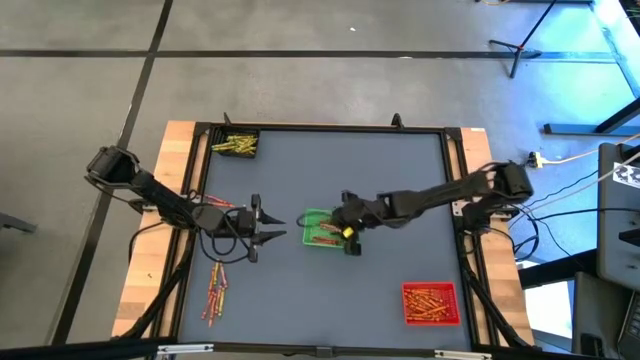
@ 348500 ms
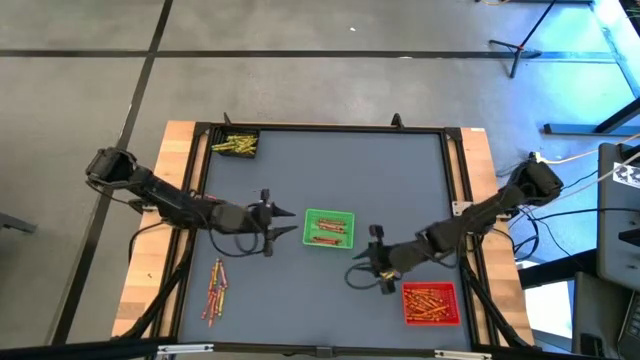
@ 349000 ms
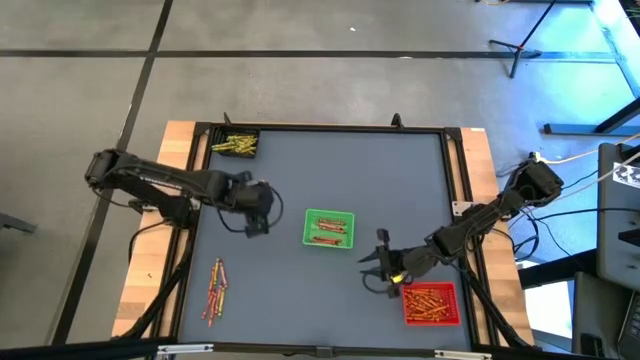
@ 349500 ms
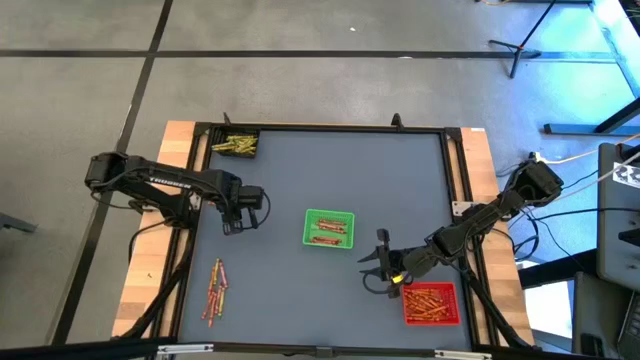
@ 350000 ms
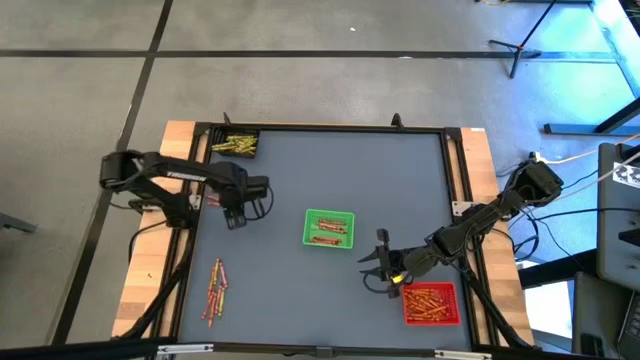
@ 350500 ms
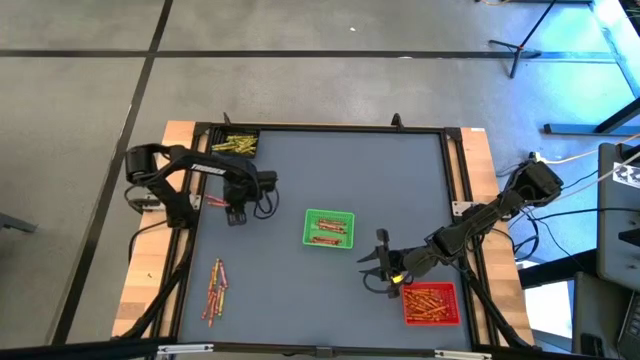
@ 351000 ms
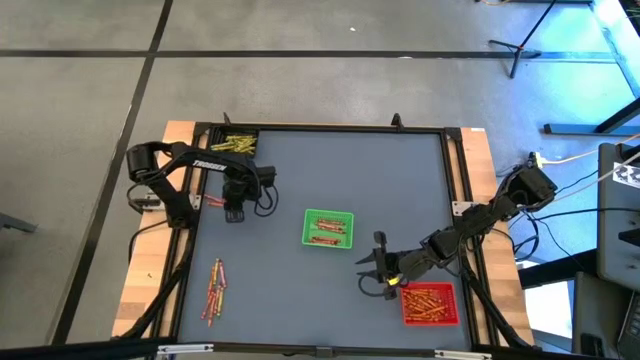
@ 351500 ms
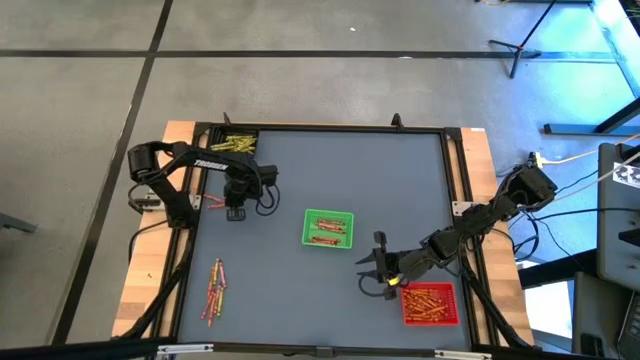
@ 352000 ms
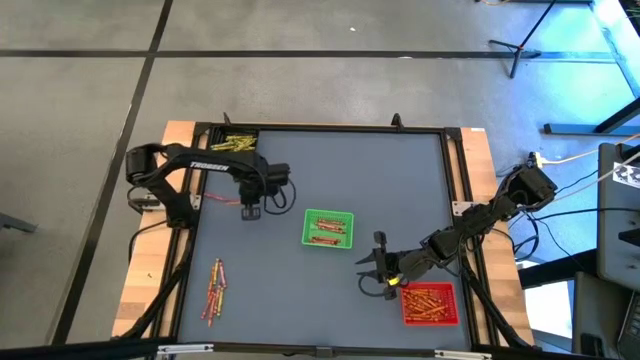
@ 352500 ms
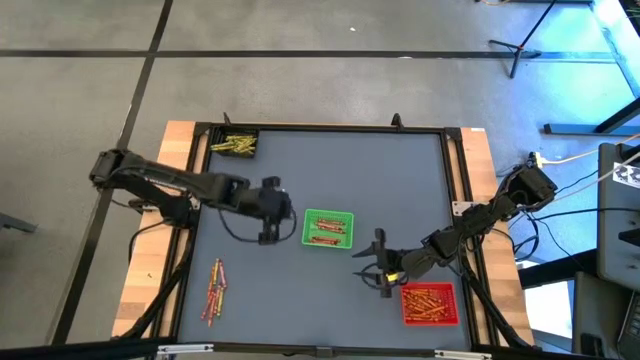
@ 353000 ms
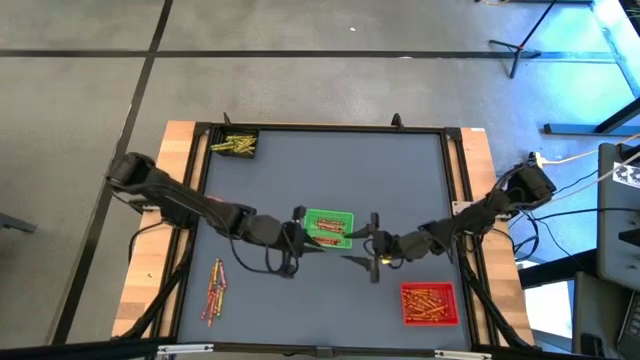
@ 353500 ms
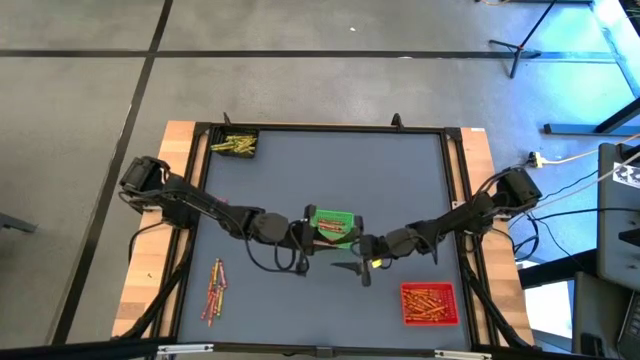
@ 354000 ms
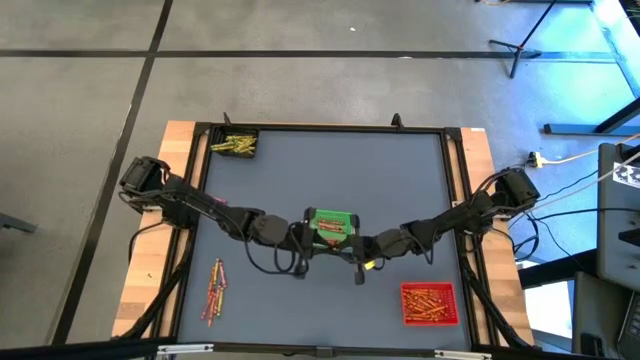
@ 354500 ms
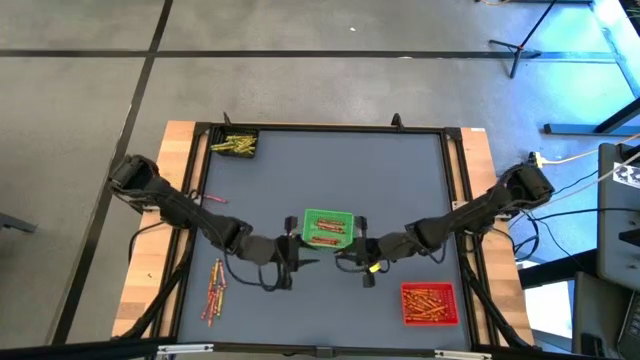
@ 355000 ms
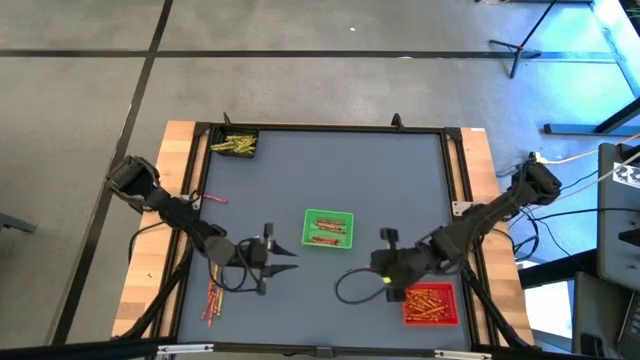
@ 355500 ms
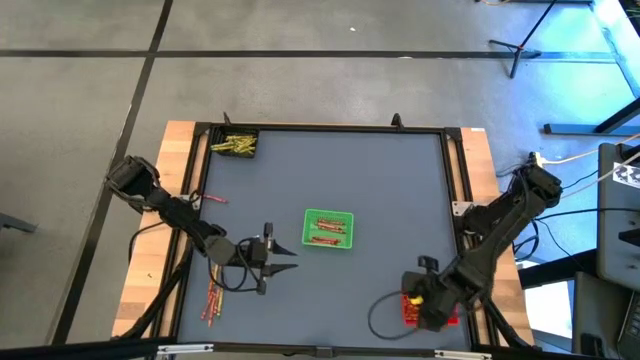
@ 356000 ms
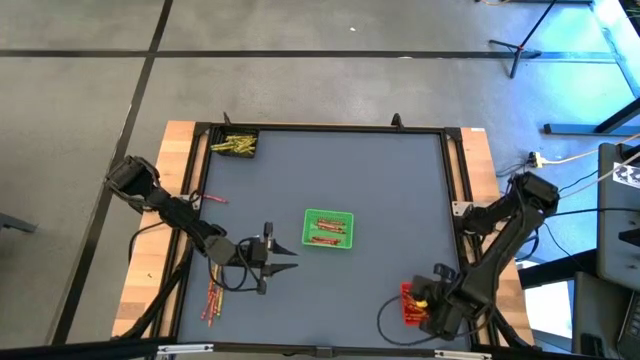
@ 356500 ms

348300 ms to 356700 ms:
Task: Sort crayons
Put the orange crayon into the red bin

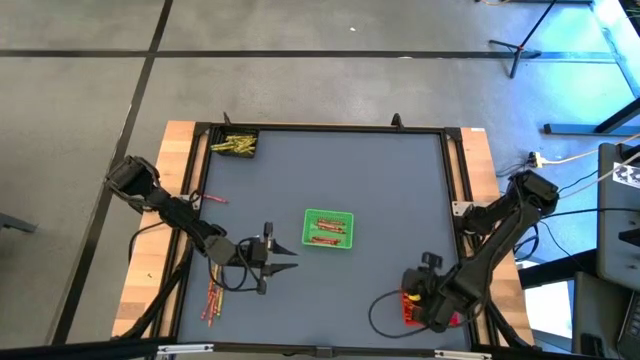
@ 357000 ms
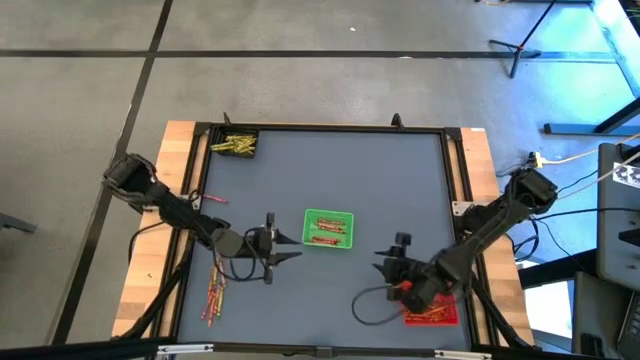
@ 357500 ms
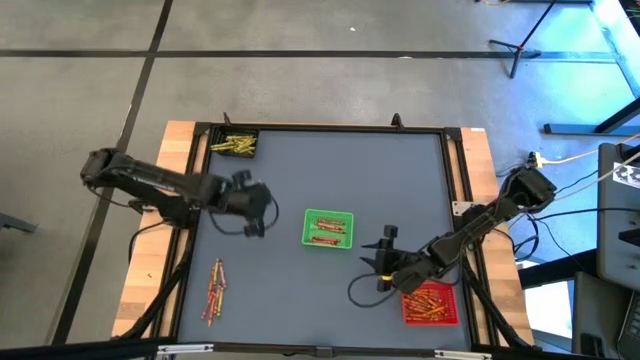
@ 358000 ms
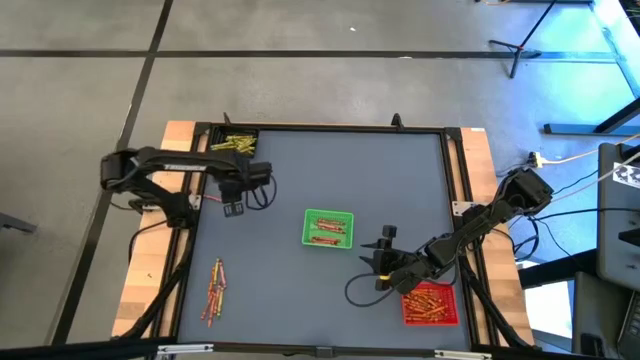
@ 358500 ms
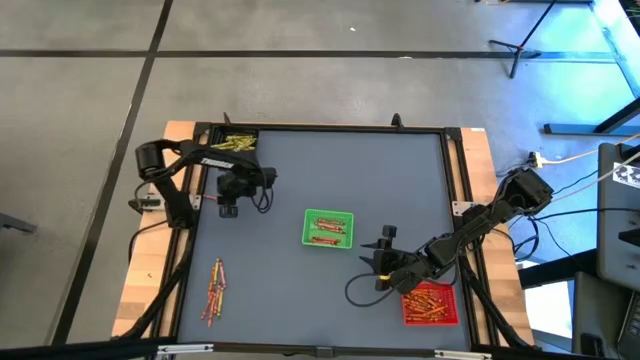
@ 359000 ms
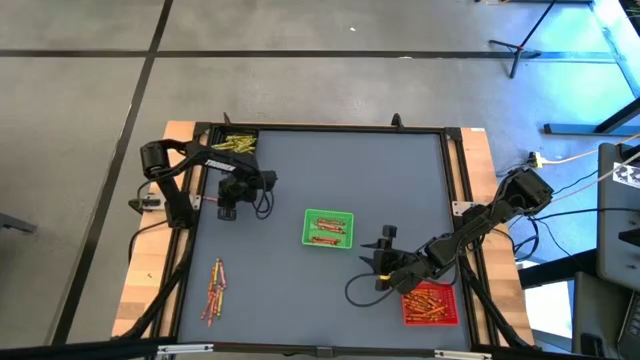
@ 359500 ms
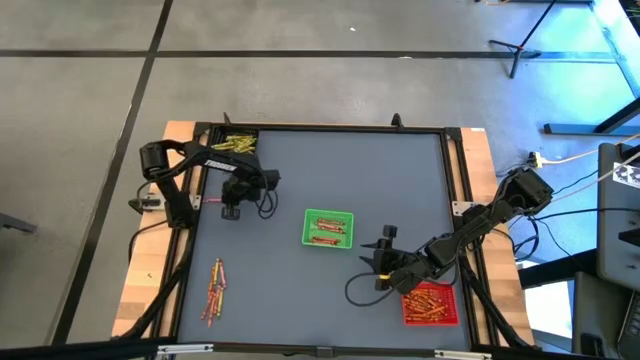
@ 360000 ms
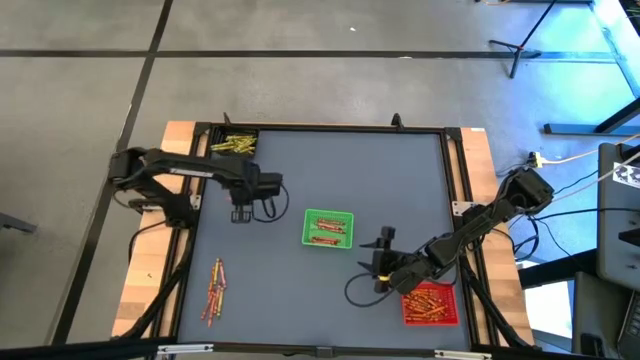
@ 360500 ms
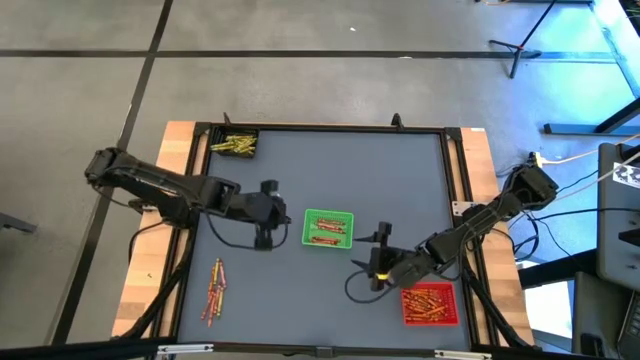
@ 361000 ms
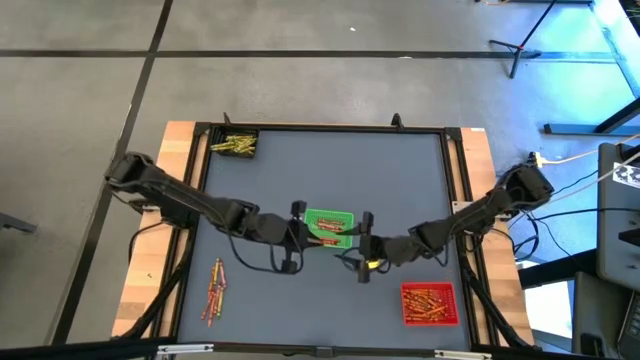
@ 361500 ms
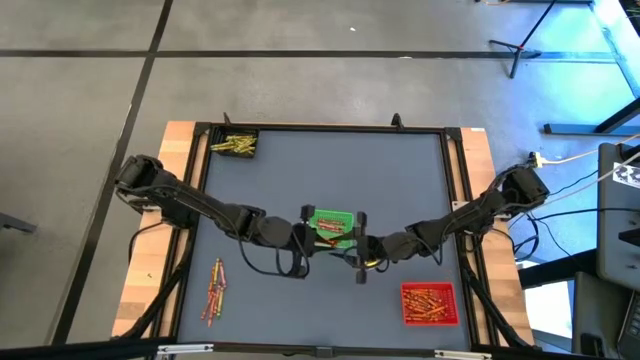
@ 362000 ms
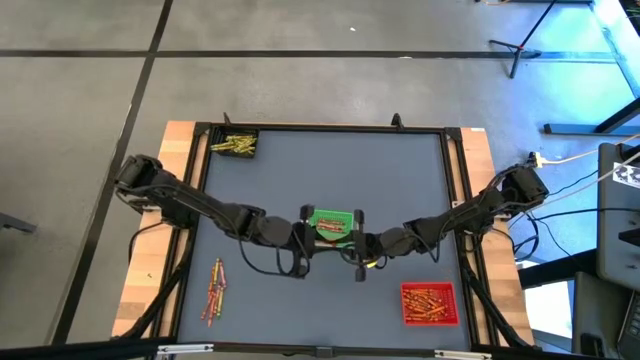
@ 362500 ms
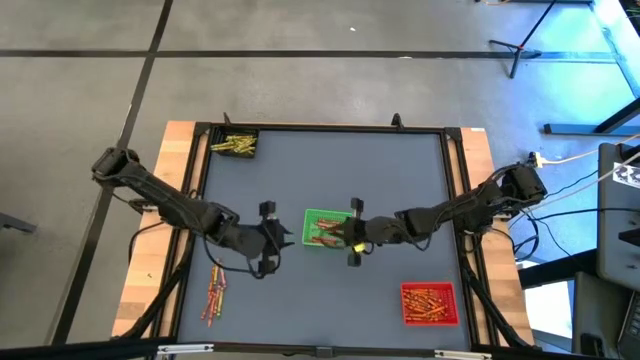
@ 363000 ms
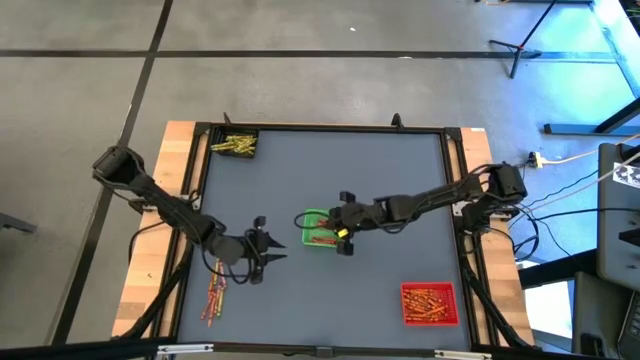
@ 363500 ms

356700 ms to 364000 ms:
Put the red crayon into the green bin

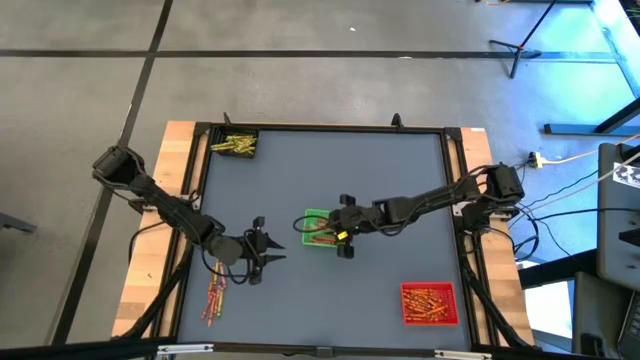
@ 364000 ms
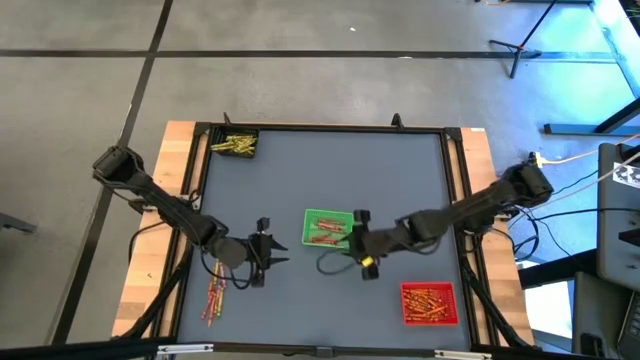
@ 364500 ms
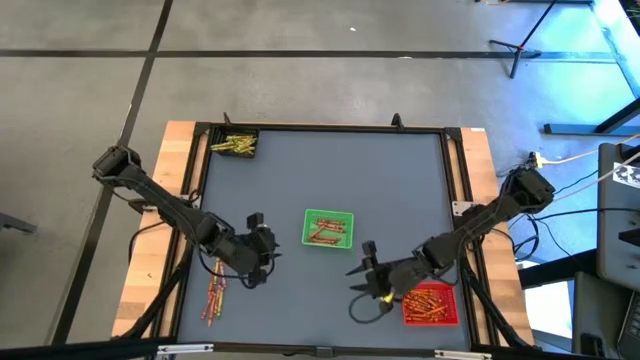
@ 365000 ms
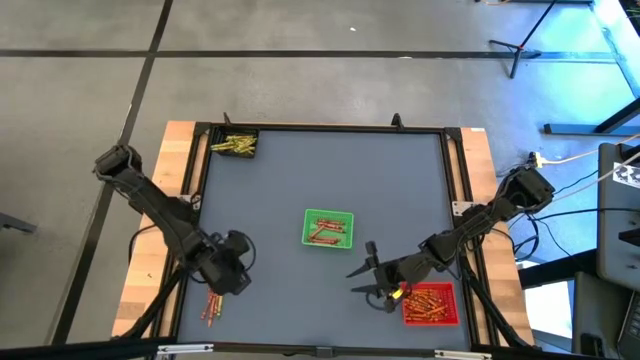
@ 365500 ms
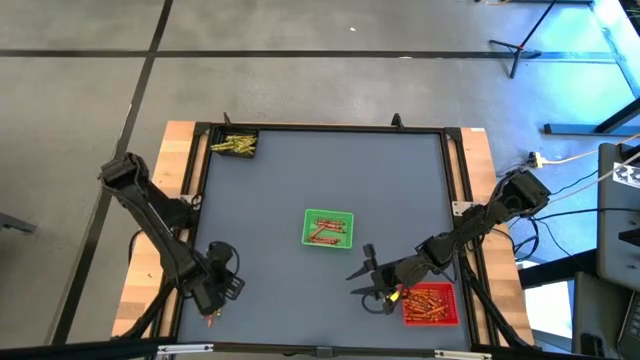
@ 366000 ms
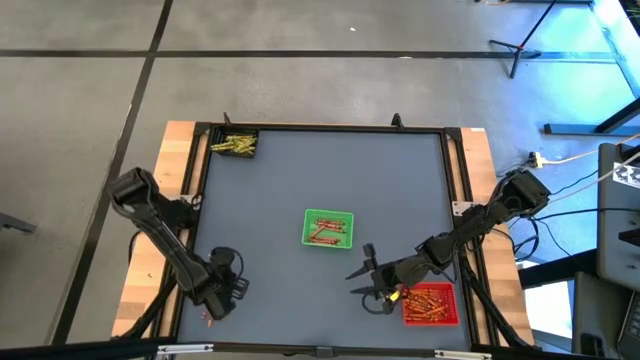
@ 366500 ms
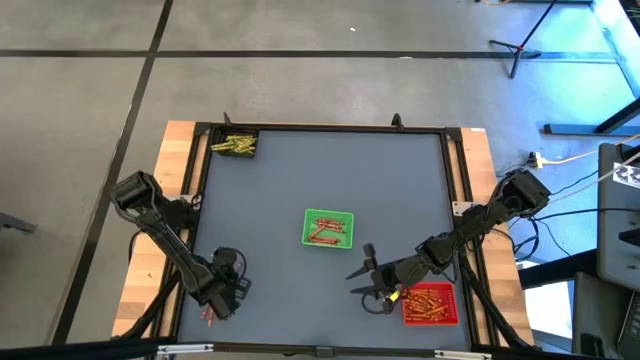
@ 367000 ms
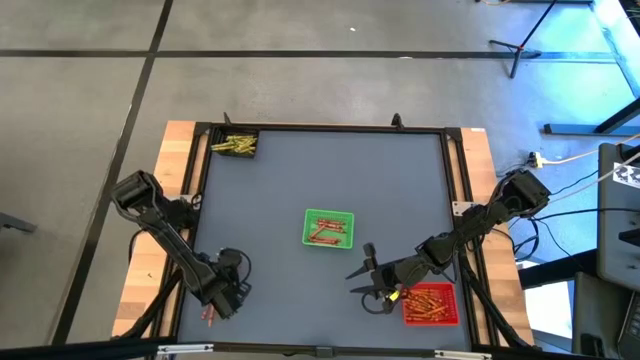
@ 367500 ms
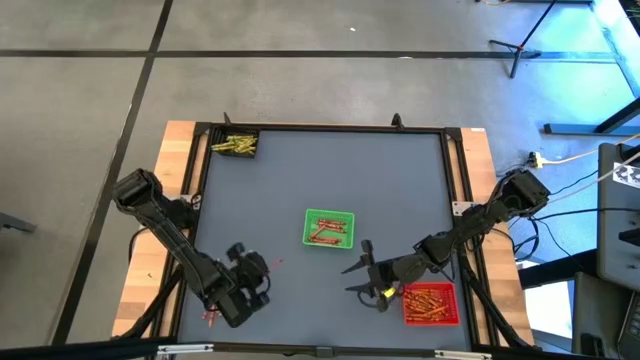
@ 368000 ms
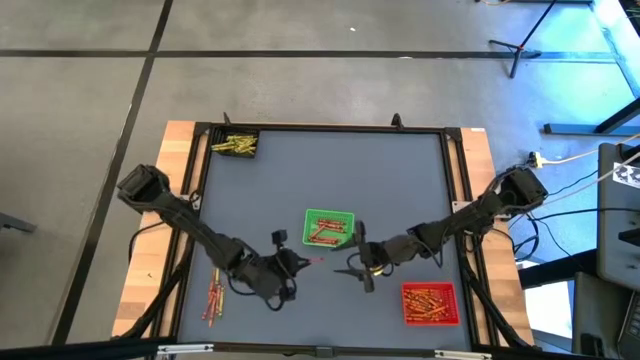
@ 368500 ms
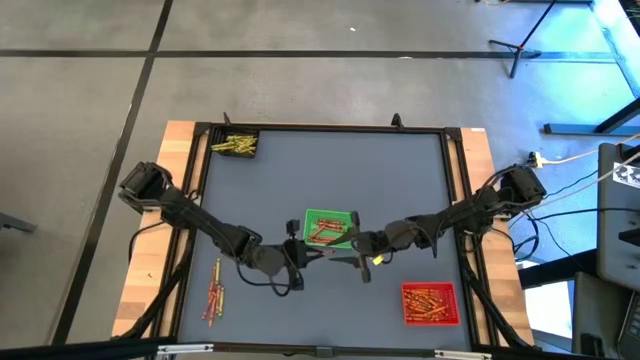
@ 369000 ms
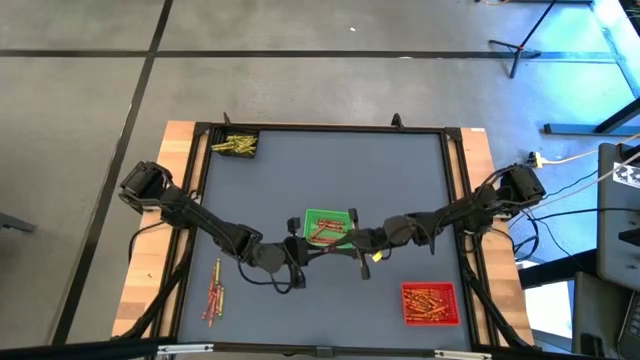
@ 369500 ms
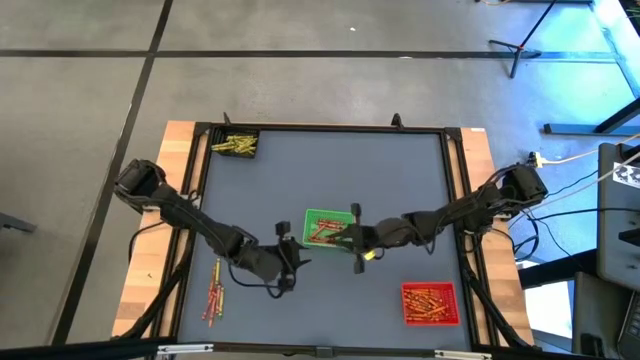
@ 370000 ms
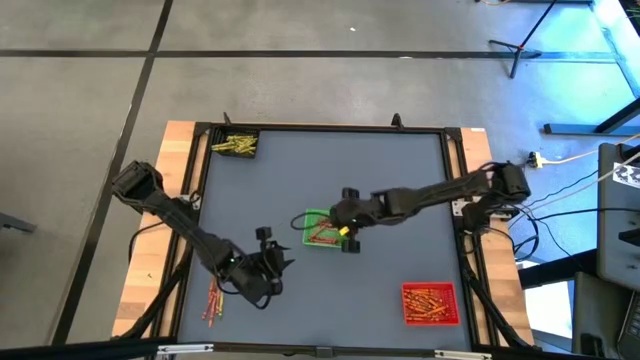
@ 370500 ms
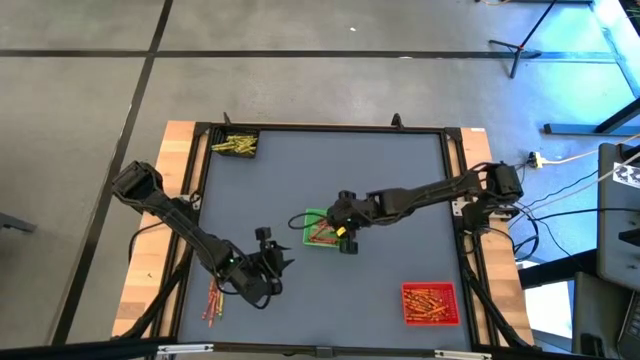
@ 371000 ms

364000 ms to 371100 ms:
Put the red crayon into the green bin
